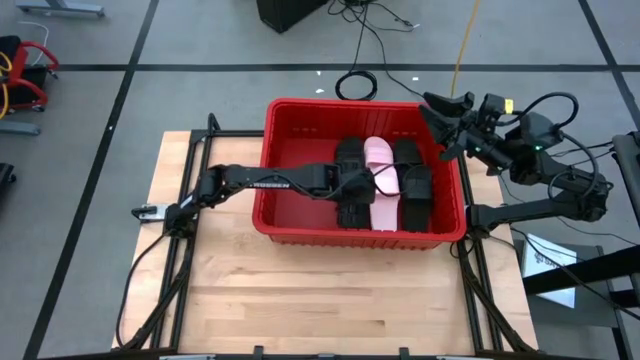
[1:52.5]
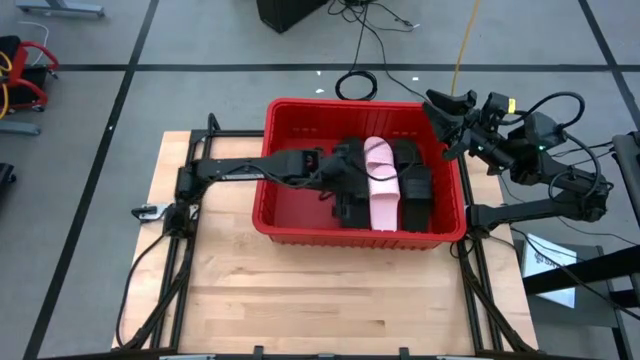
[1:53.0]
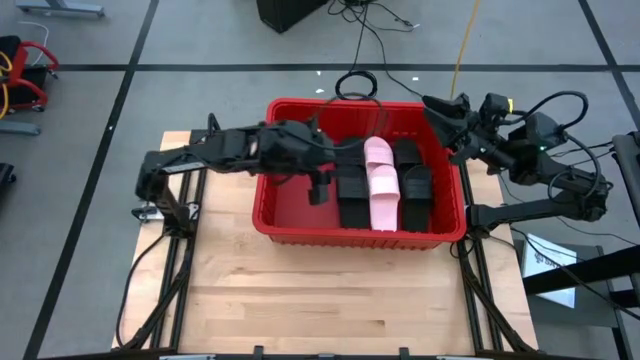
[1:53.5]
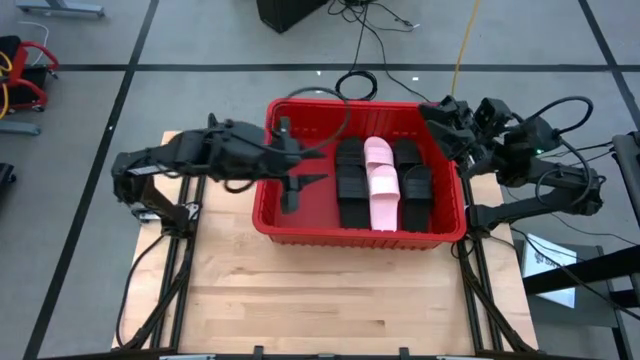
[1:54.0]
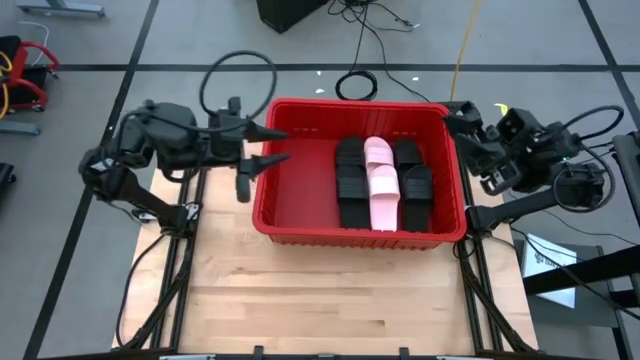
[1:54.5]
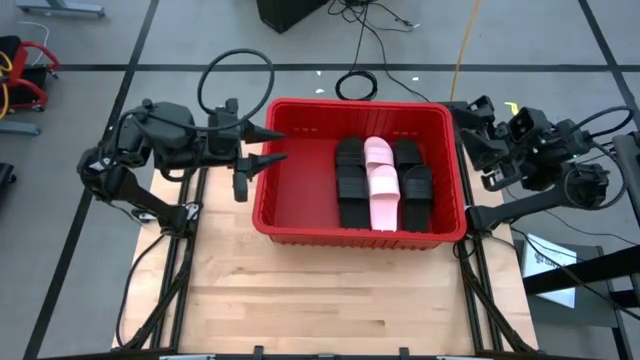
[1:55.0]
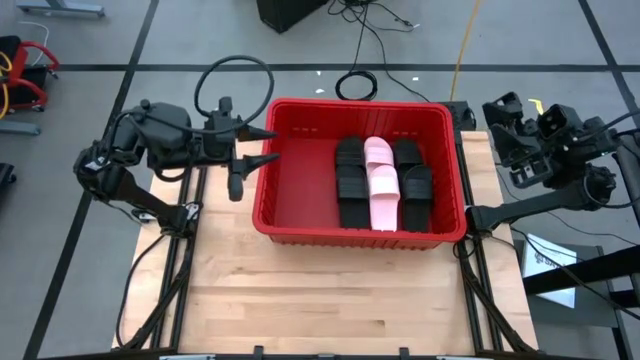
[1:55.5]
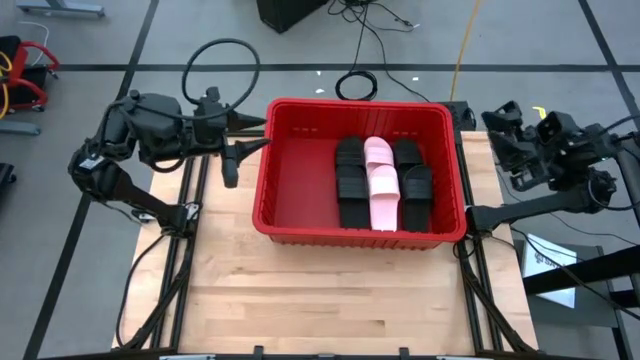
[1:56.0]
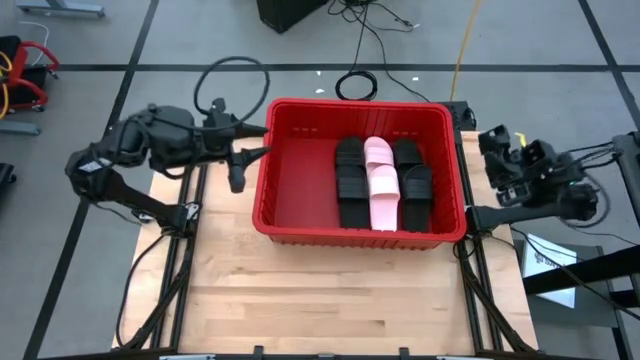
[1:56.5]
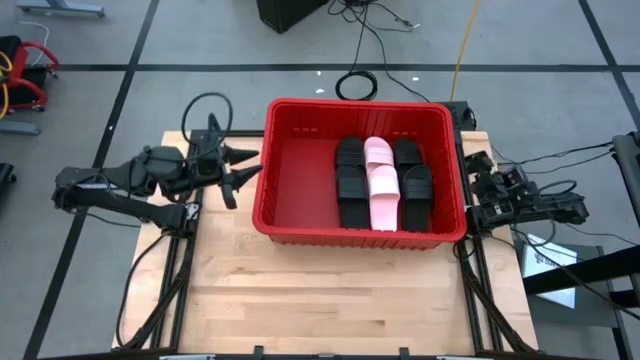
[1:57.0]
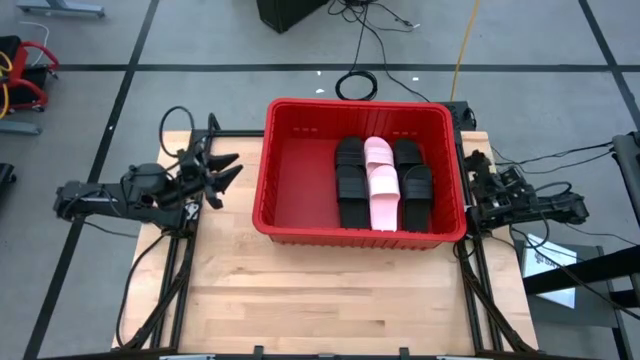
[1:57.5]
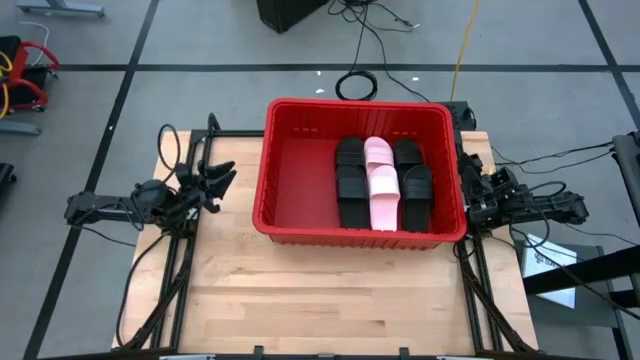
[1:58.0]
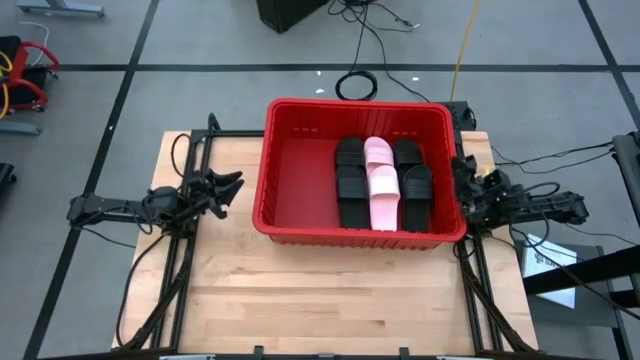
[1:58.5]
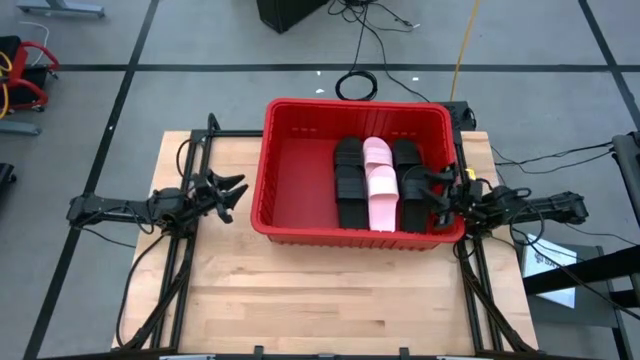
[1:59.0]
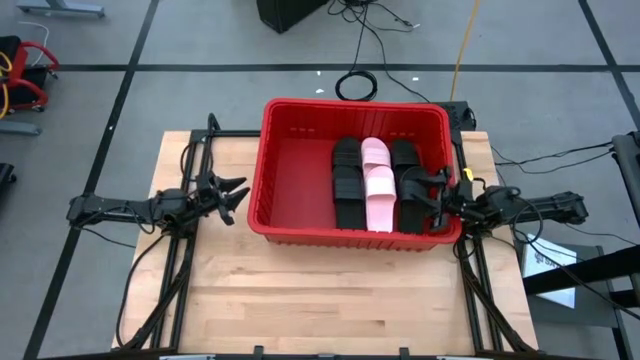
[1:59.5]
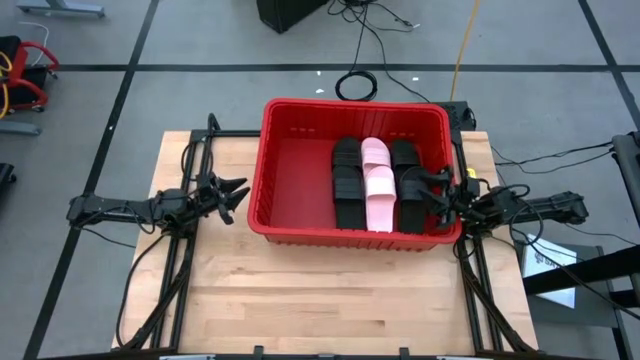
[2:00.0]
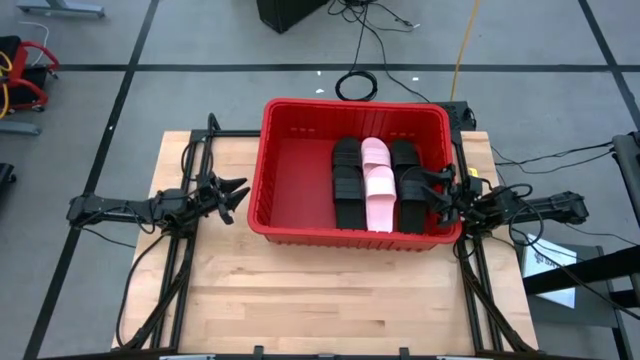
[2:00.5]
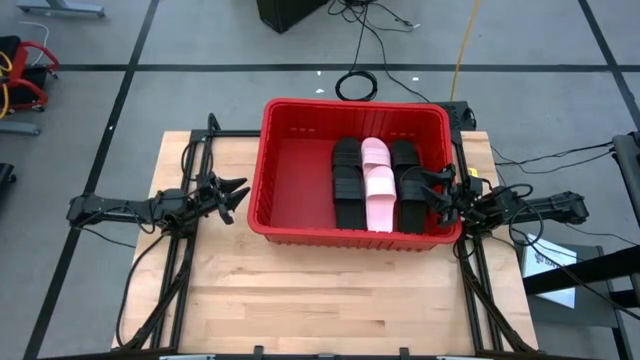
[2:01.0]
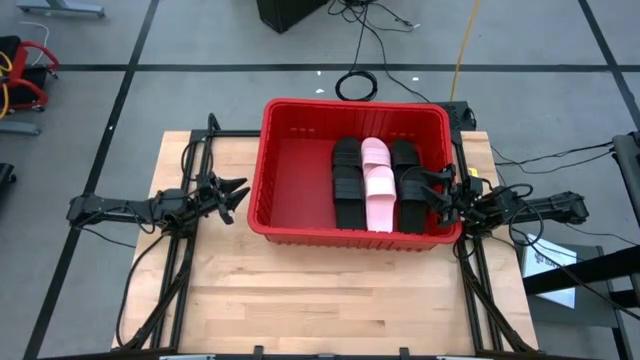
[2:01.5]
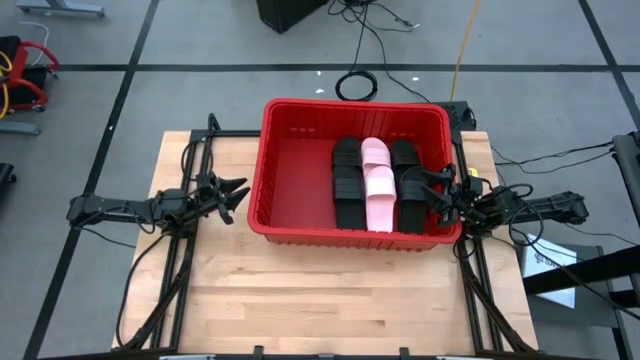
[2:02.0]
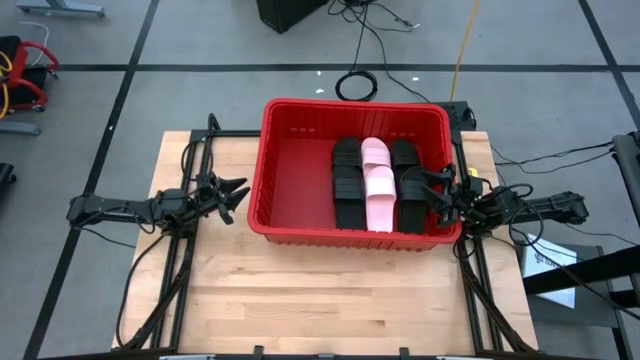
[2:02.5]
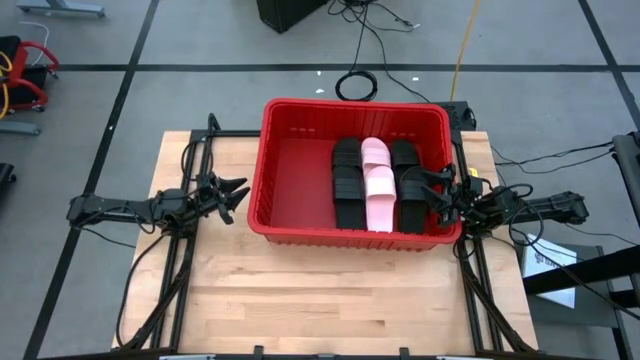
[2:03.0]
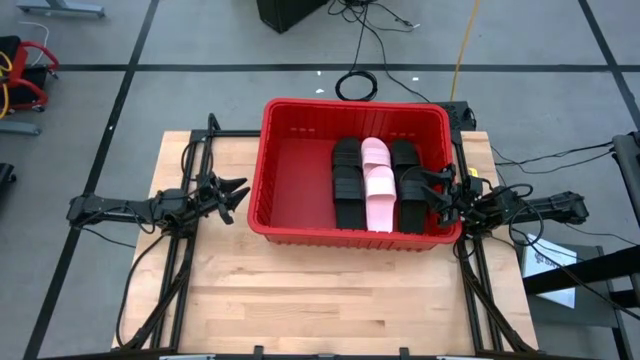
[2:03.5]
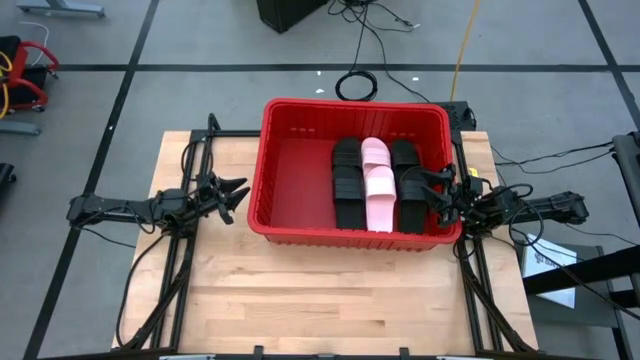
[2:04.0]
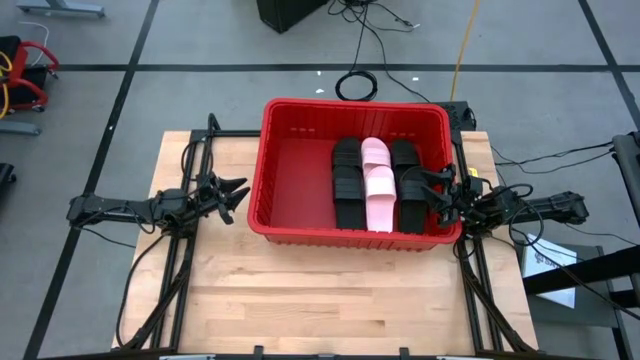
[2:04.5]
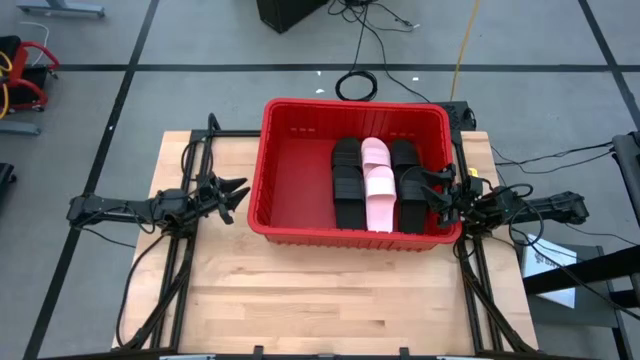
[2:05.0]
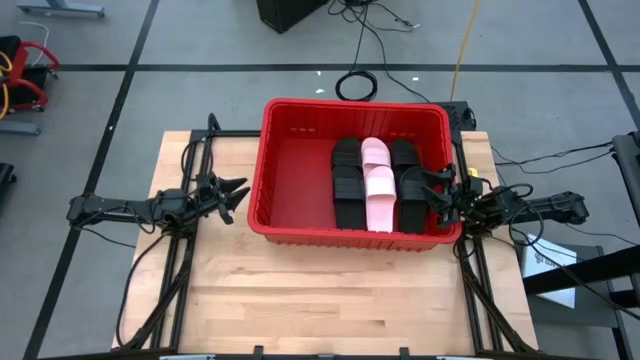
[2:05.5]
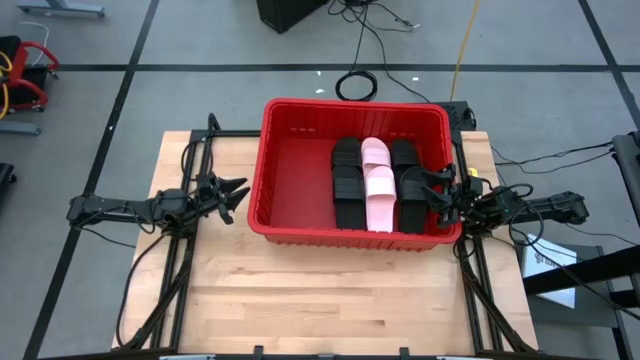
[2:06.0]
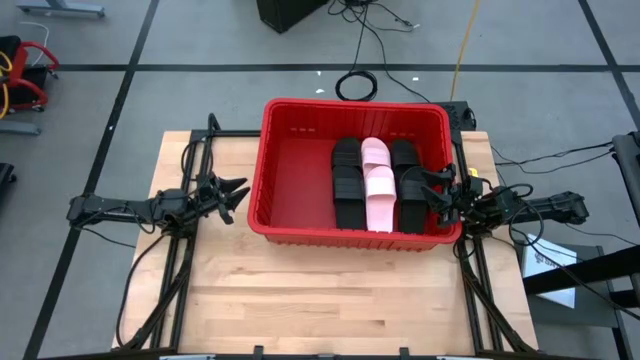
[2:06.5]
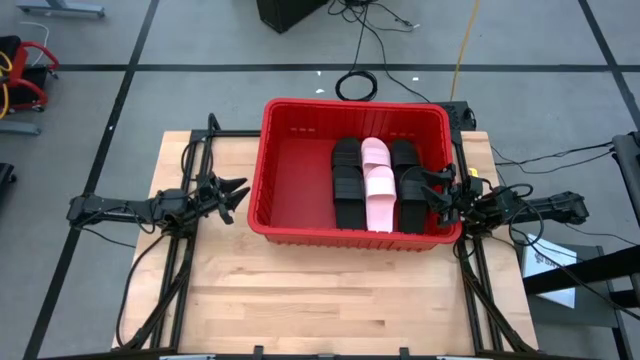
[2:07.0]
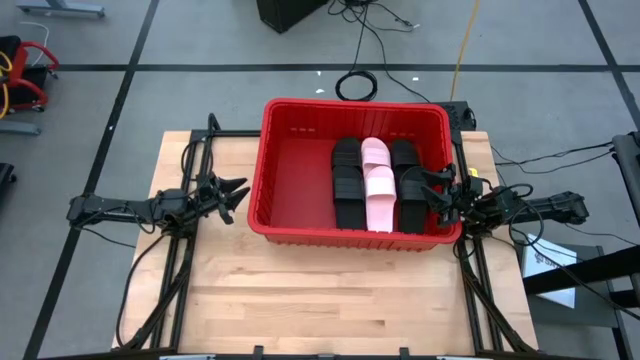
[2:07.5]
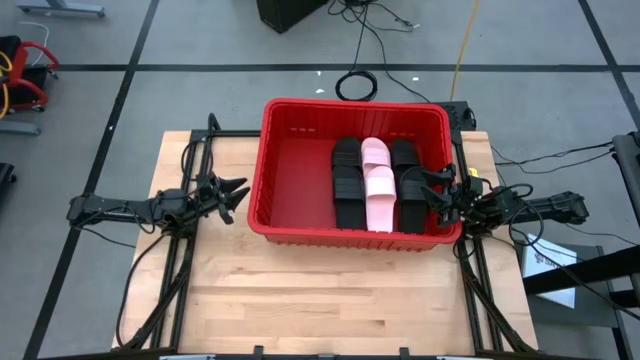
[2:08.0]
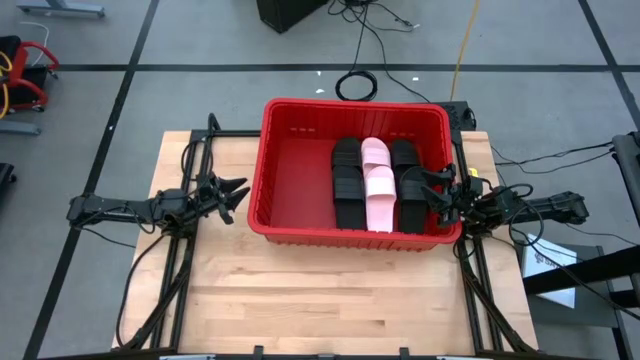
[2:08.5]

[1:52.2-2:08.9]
Task: Pick and place slides into bin
Return to Home Position
